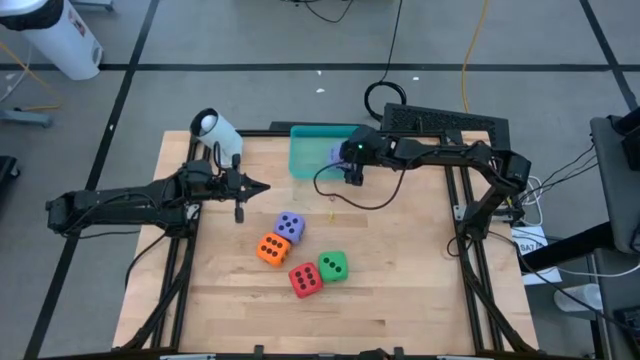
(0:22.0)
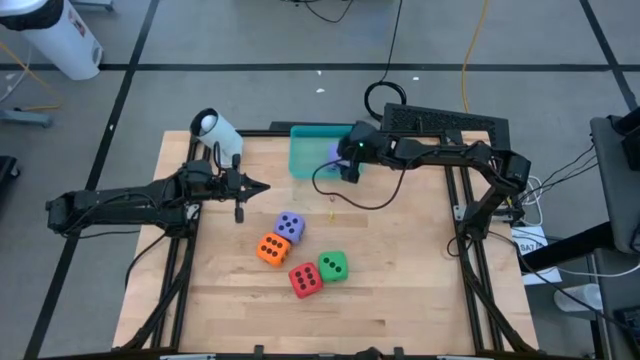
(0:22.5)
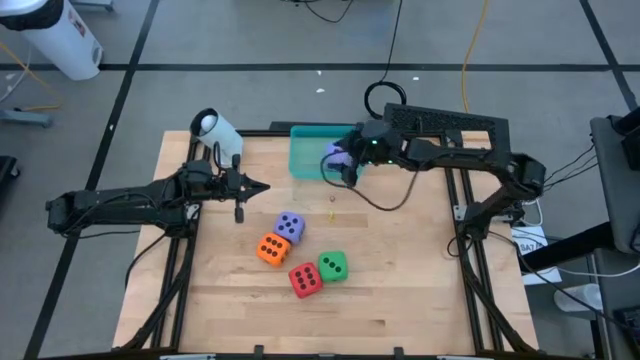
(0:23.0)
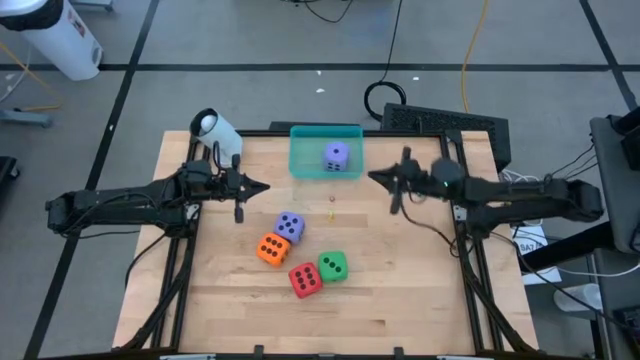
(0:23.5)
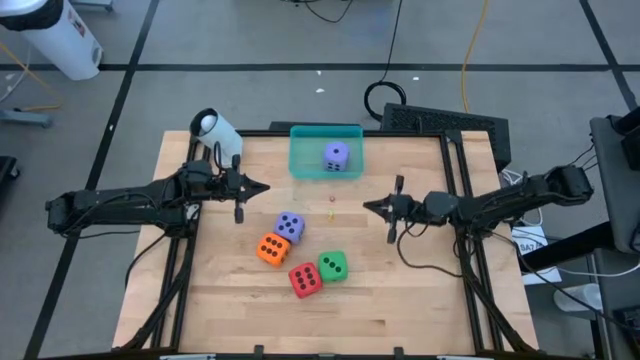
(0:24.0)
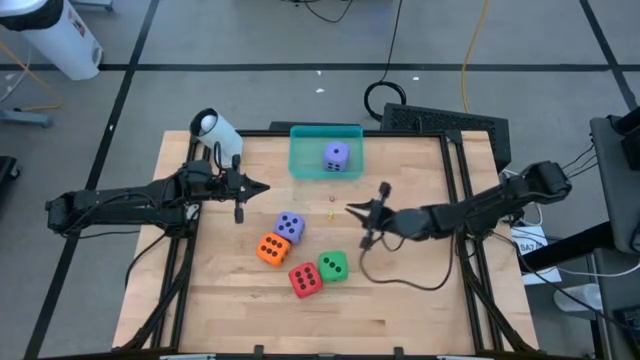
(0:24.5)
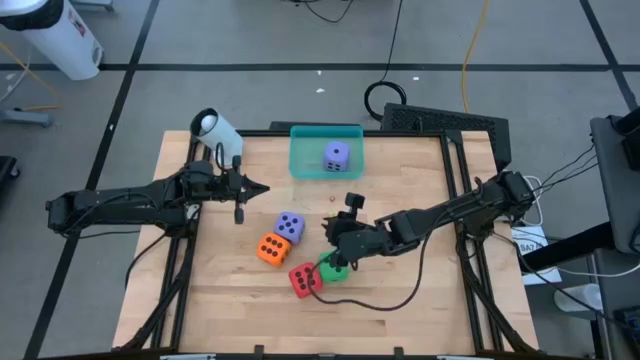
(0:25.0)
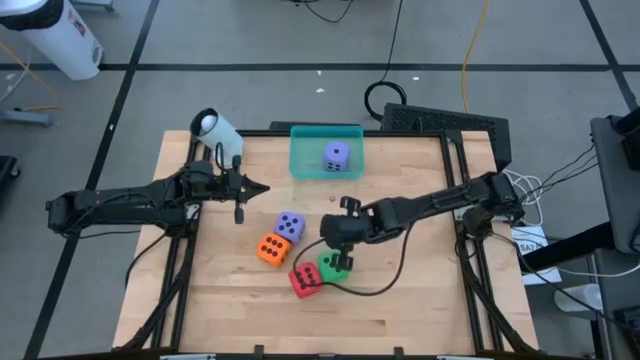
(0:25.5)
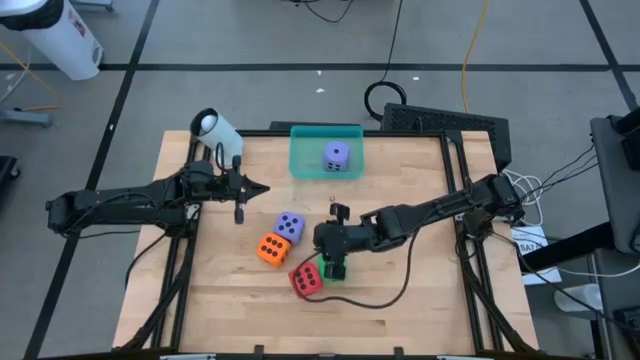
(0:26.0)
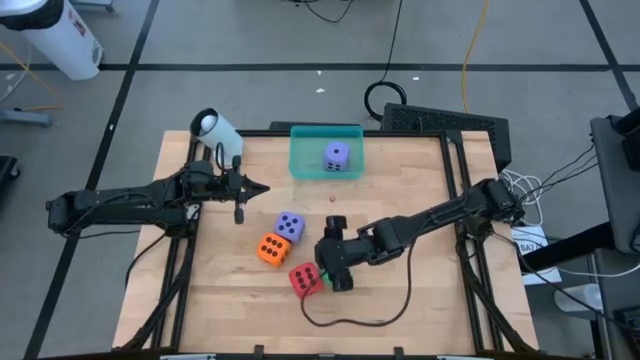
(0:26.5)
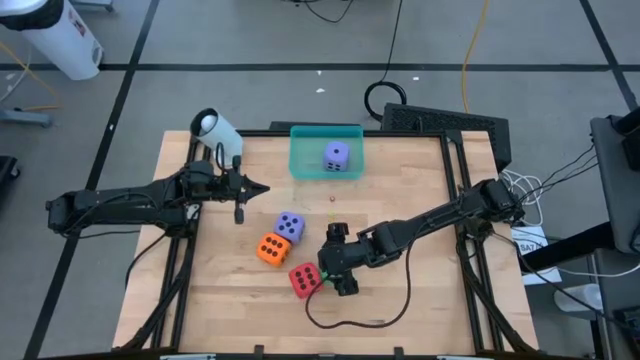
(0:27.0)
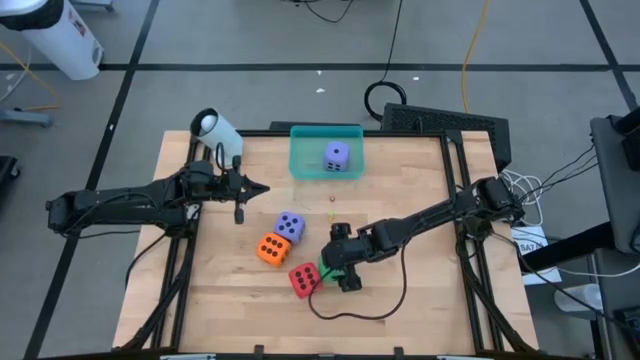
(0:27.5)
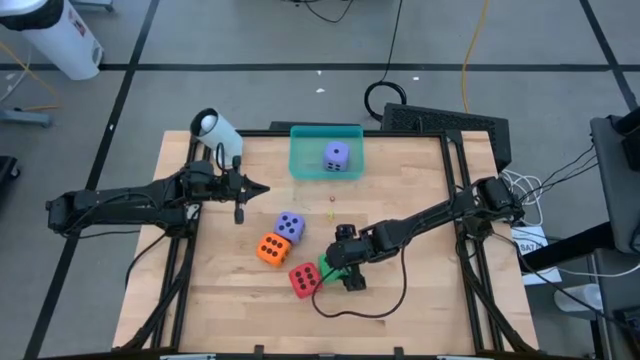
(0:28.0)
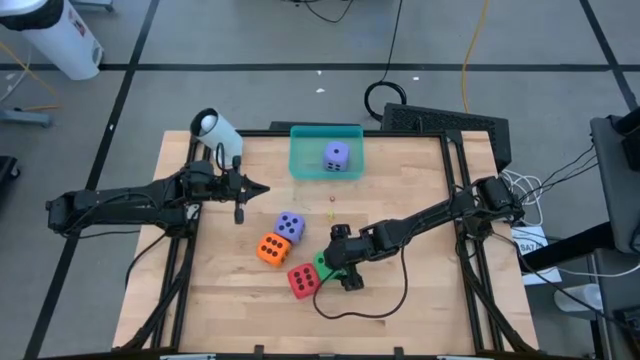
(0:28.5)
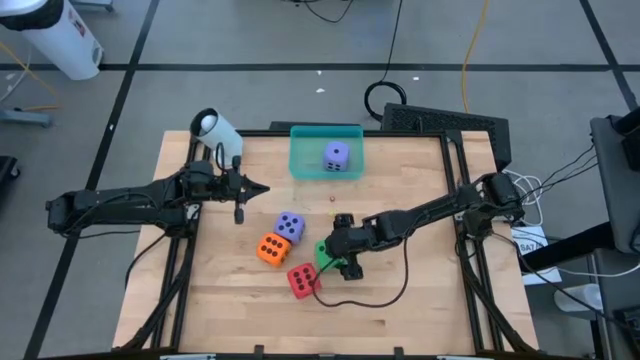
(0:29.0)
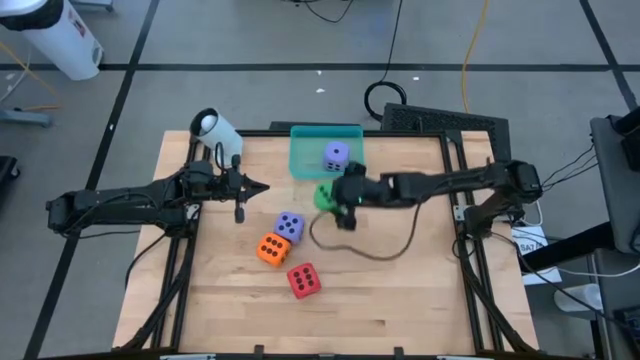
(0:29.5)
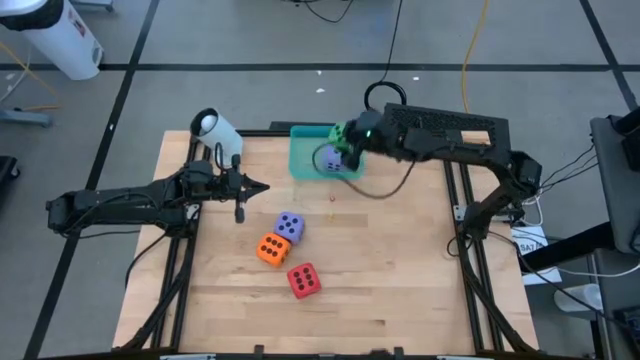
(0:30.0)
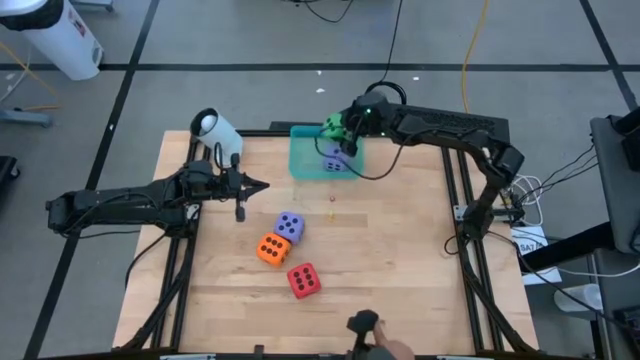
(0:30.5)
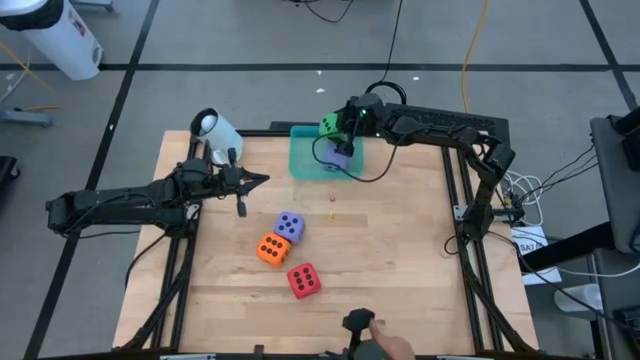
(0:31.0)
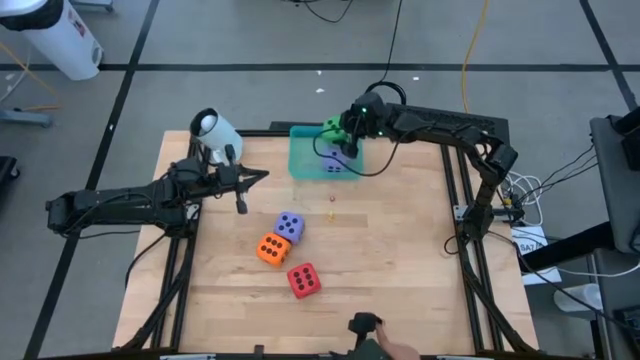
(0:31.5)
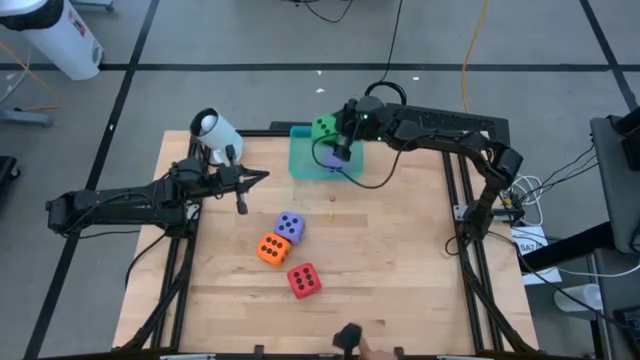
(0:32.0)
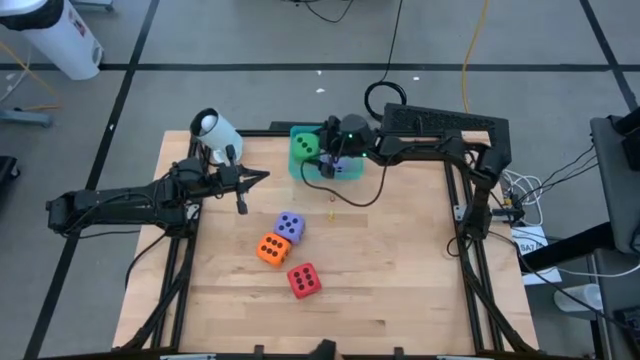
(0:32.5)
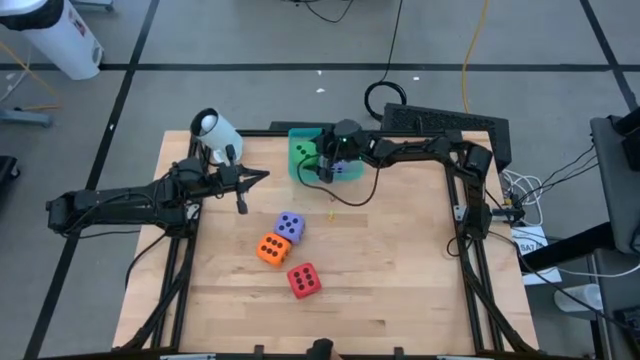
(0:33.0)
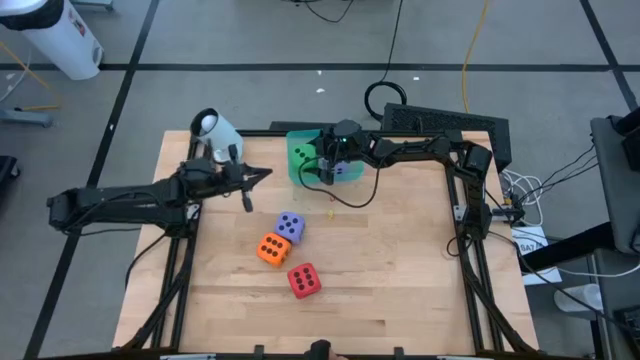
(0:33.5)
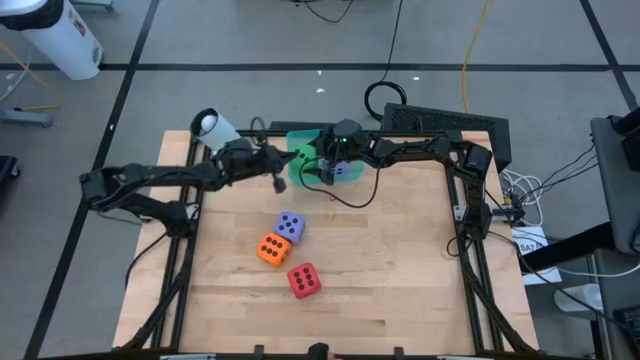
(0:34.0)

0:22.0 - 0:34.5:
Task: Pick & Place Dice
Put the large green dice into the blue bin

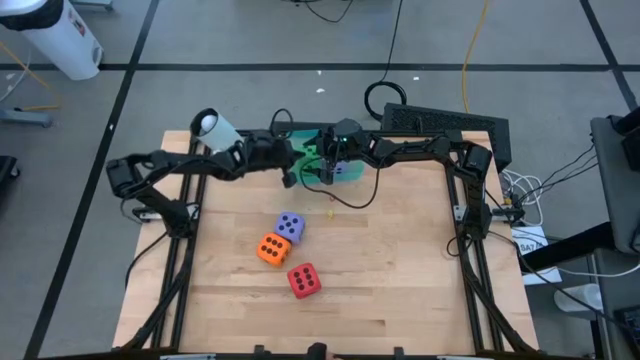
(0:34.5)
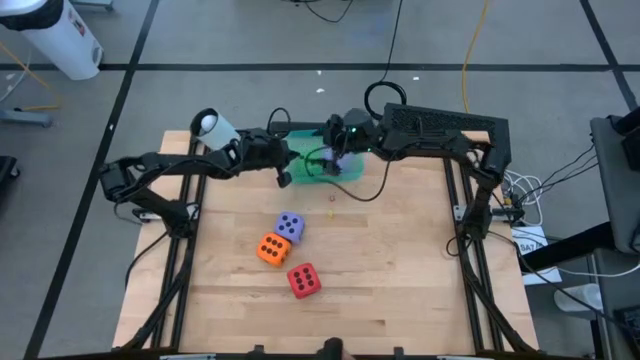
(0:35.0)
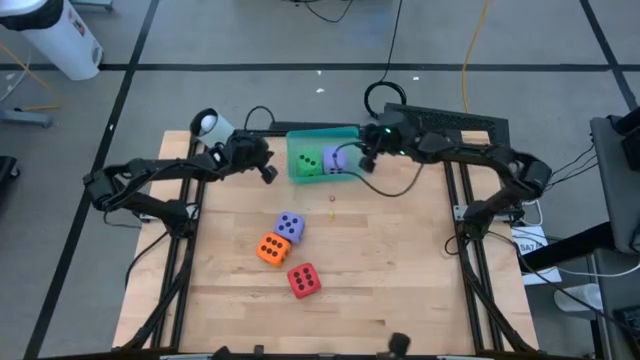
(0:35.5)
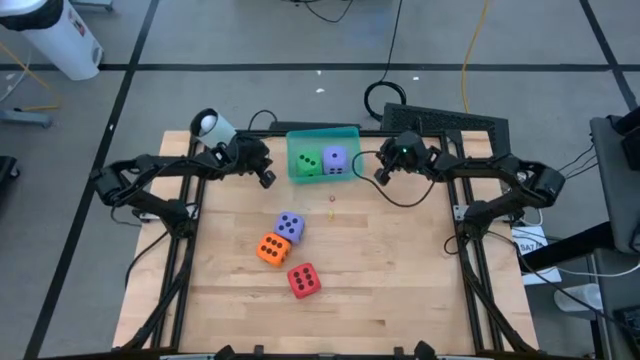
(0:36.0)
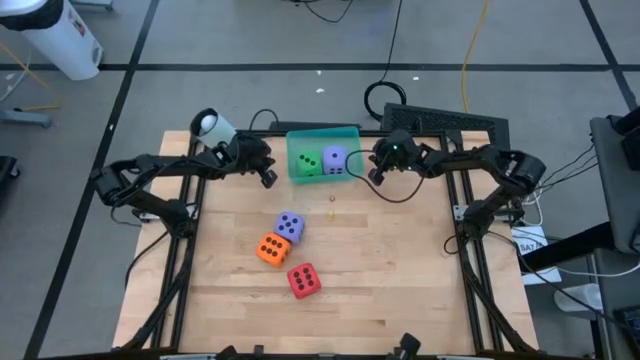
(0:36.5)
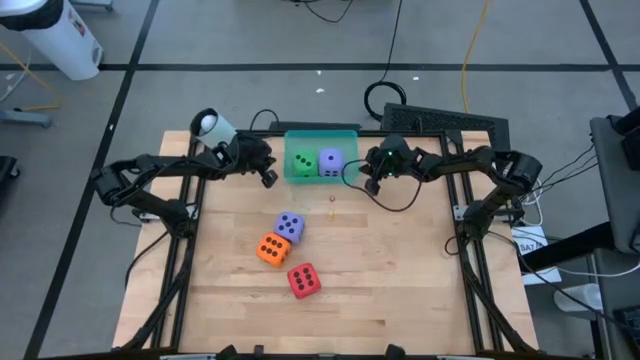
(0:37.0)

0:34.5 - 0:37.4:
Adjust the blue bin

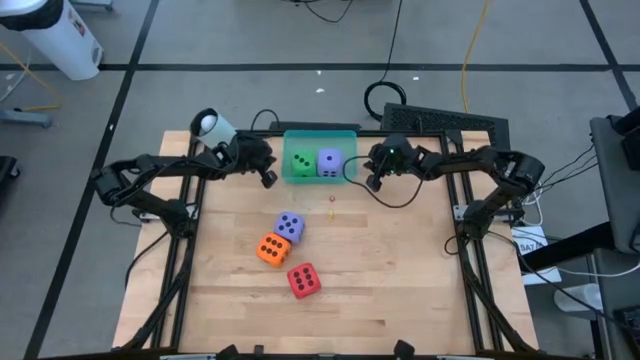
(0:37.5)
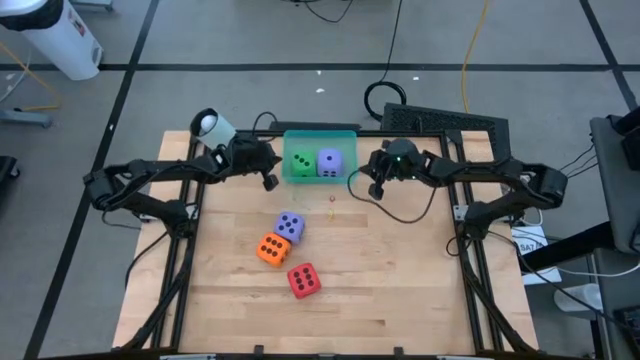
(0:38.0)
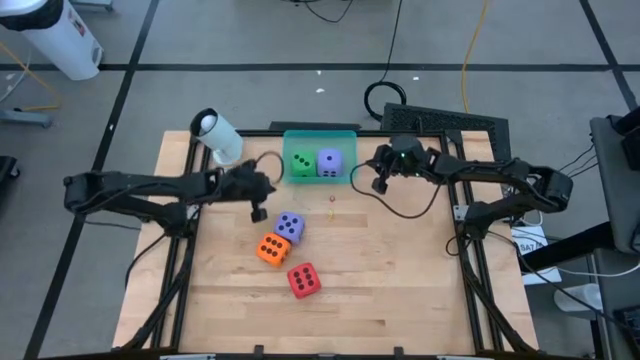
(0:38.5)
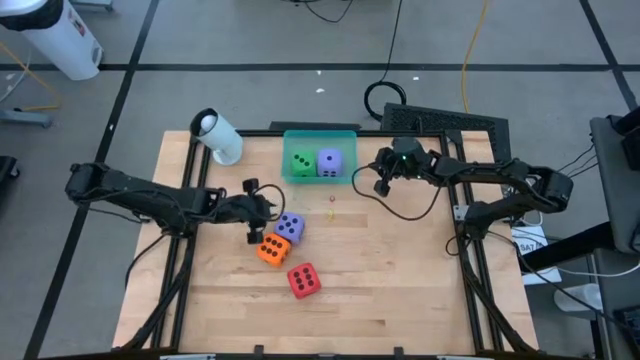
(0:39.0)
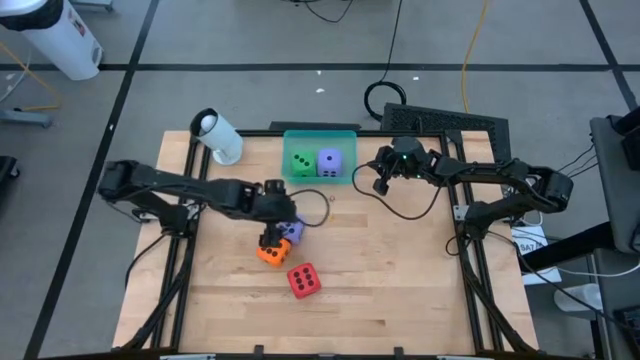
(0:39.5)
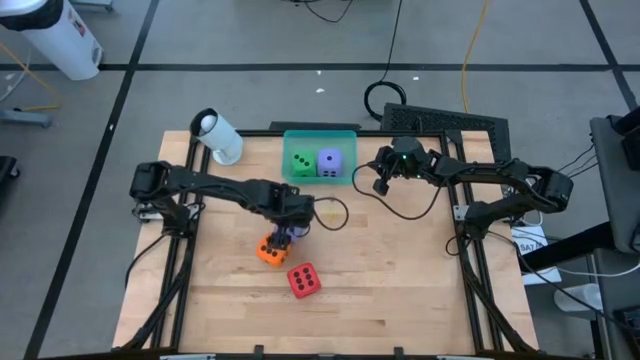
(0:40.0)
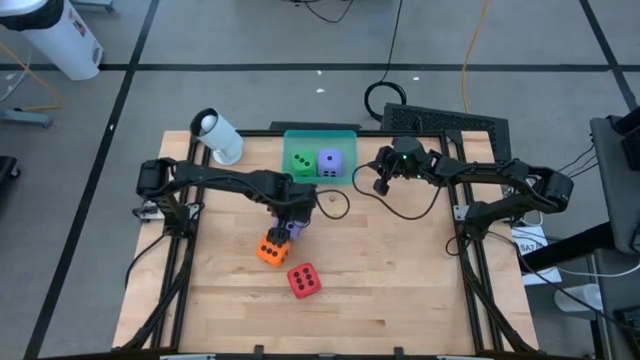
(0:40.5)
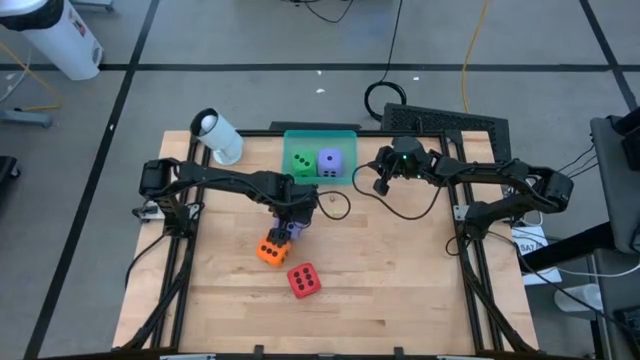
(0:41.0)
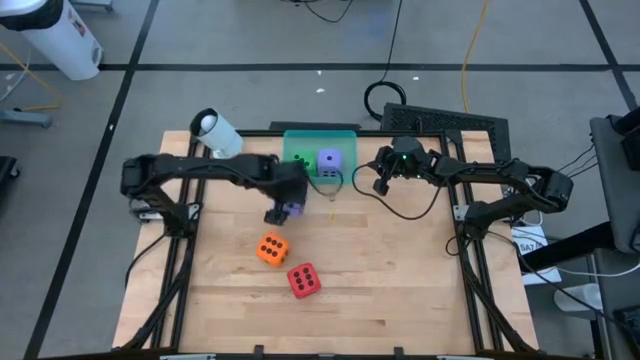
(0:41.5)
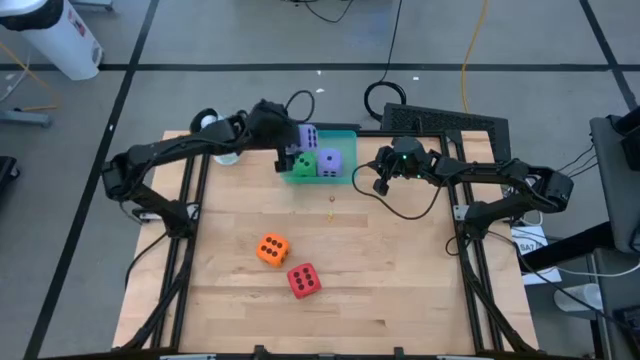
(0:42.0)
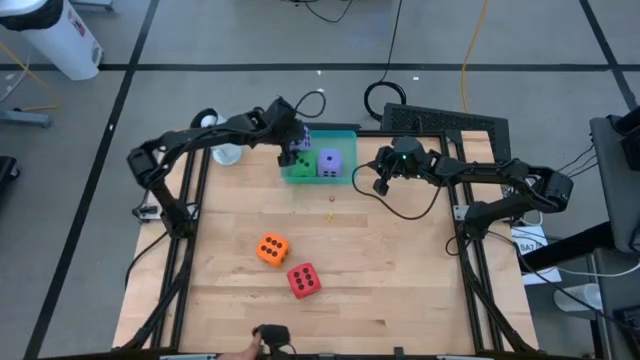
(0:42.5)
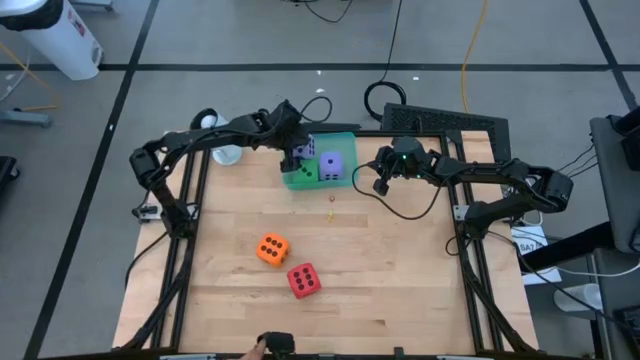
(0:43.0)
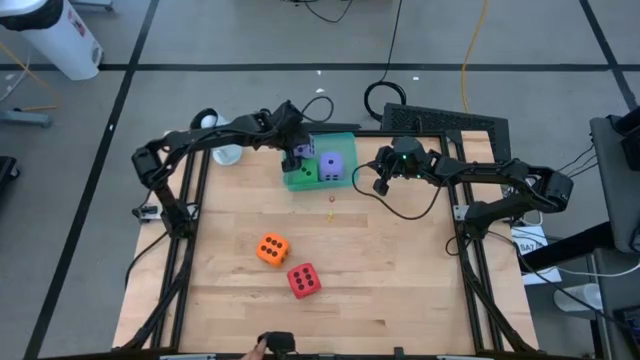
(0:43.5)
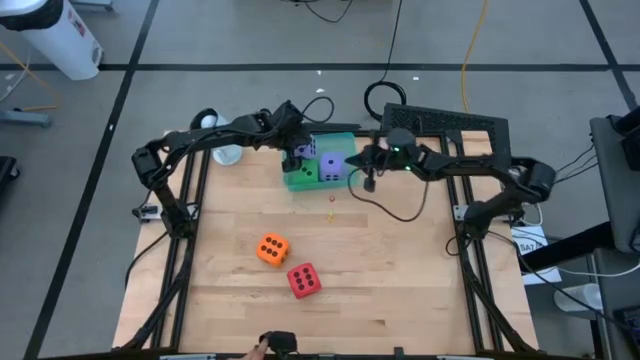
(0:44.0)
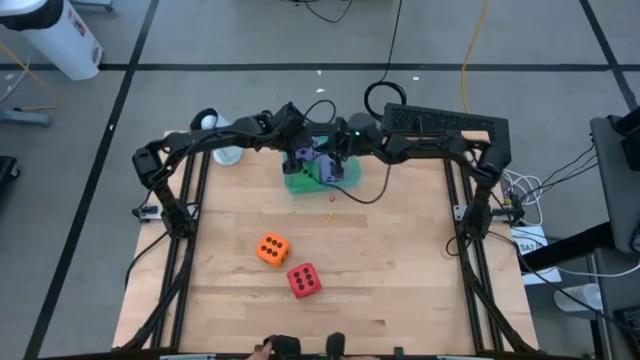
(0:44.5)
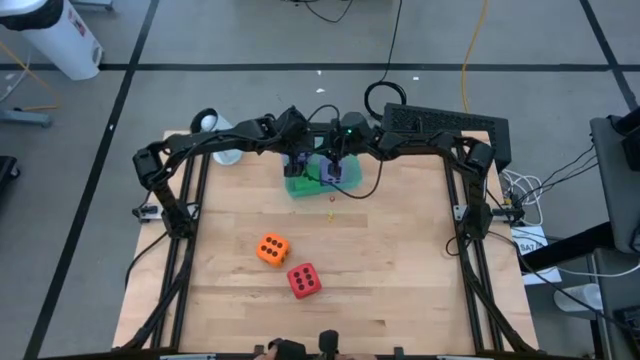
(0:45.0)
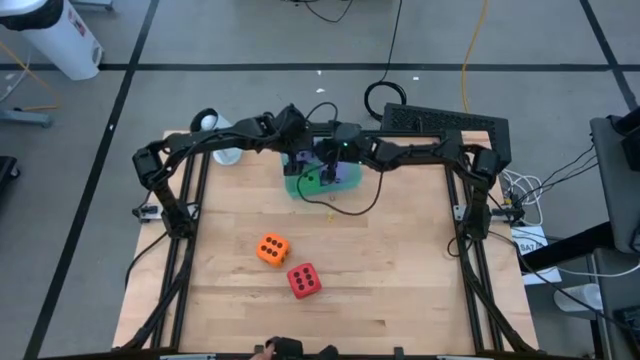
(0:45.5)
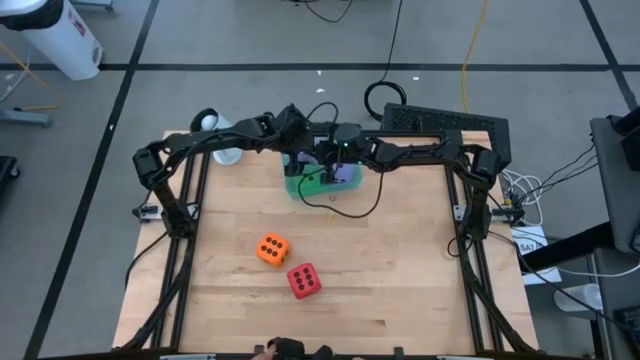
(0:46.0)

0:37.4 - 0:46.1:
Put the large purple dice into the blue bin
